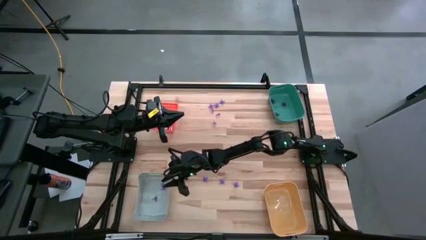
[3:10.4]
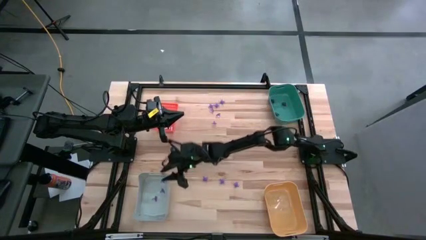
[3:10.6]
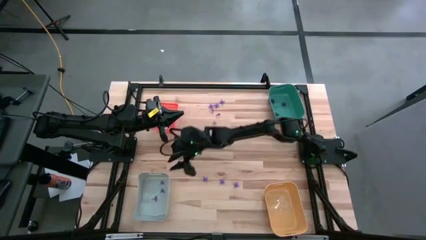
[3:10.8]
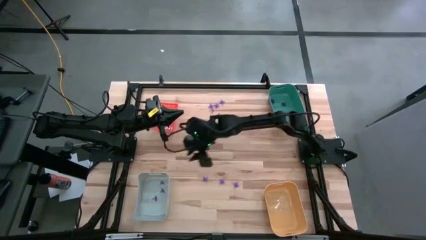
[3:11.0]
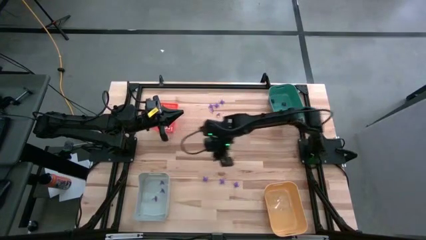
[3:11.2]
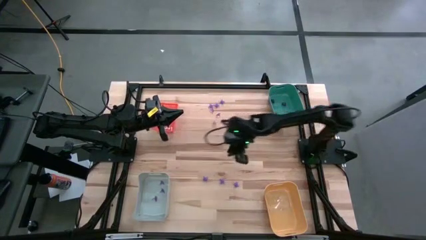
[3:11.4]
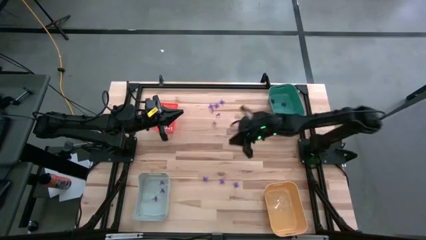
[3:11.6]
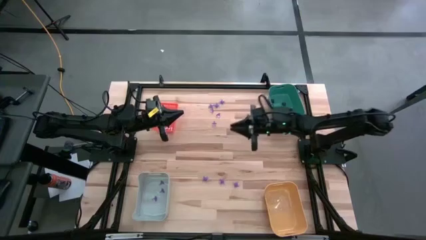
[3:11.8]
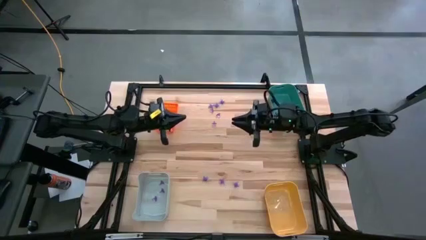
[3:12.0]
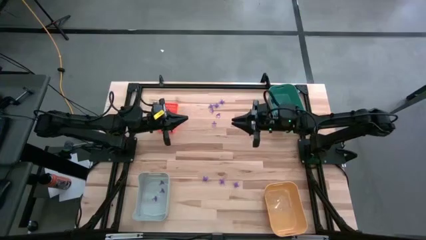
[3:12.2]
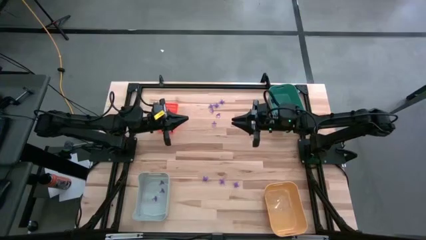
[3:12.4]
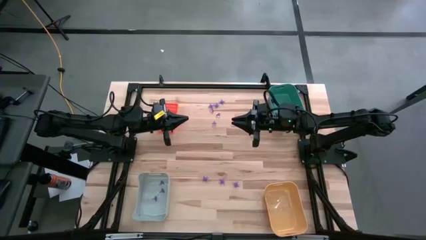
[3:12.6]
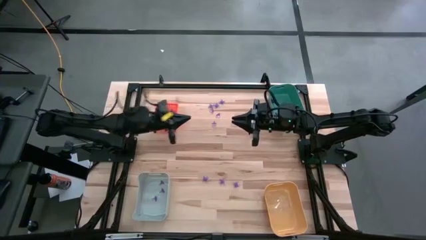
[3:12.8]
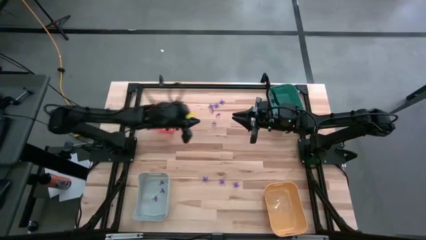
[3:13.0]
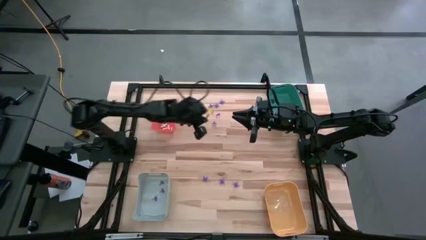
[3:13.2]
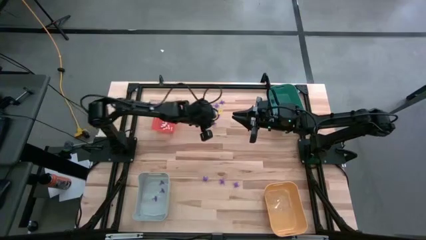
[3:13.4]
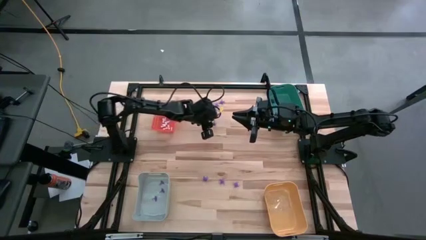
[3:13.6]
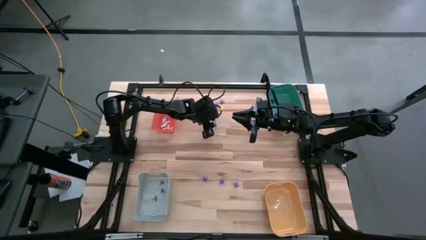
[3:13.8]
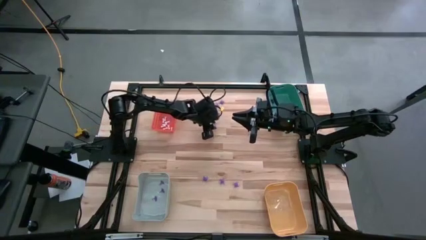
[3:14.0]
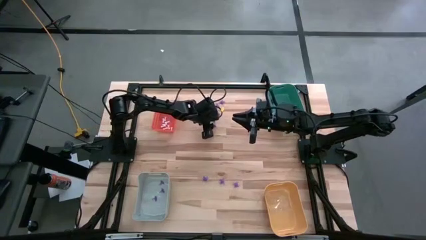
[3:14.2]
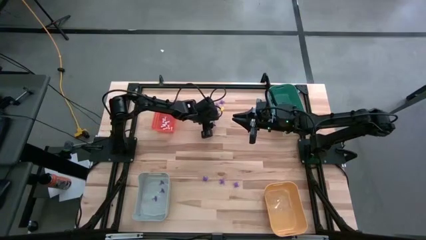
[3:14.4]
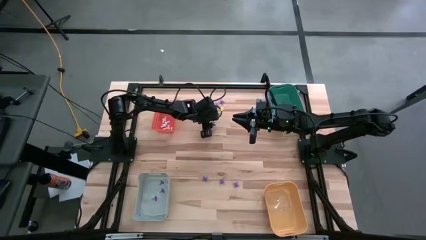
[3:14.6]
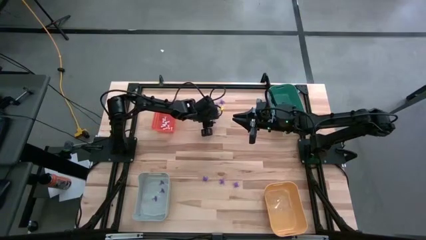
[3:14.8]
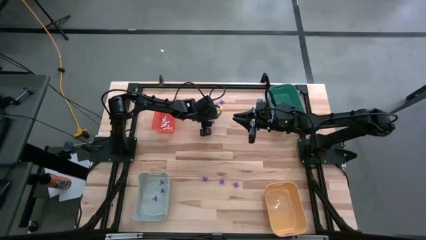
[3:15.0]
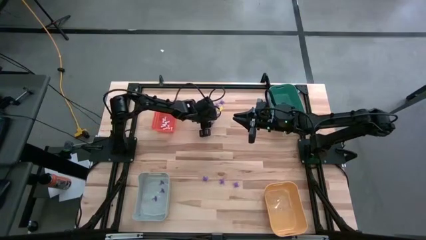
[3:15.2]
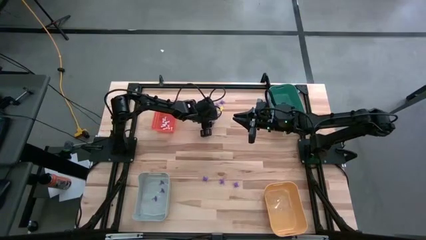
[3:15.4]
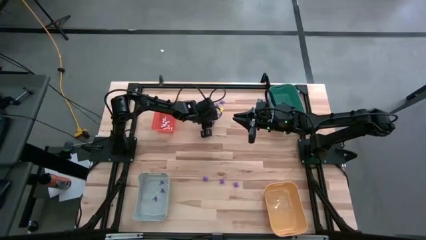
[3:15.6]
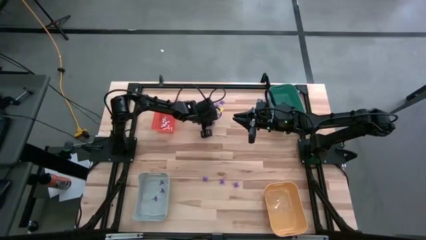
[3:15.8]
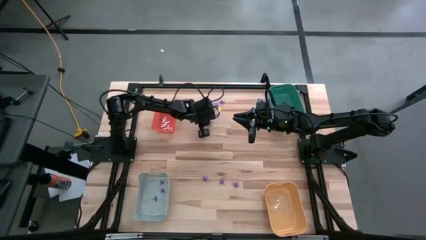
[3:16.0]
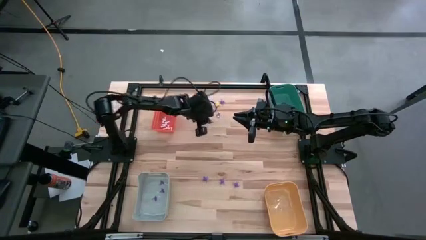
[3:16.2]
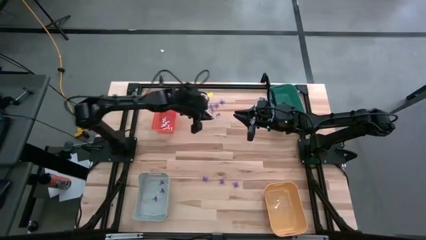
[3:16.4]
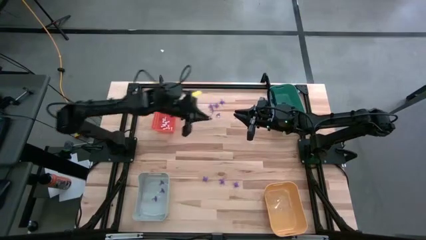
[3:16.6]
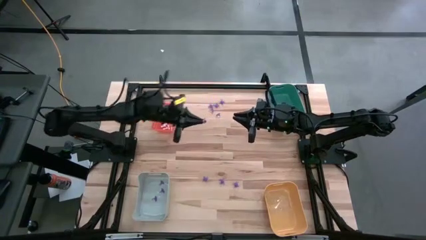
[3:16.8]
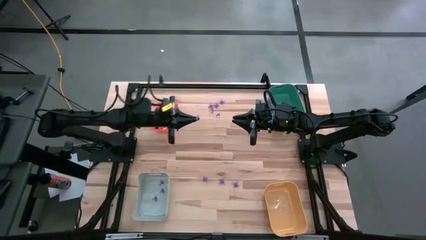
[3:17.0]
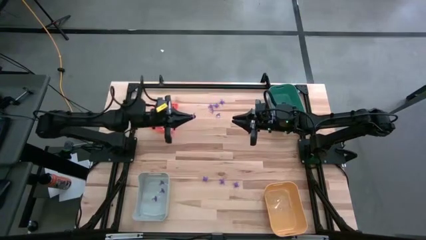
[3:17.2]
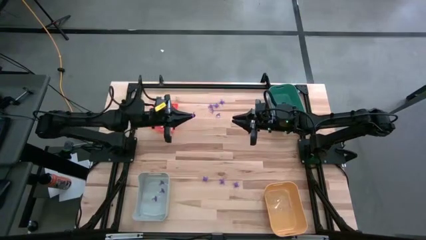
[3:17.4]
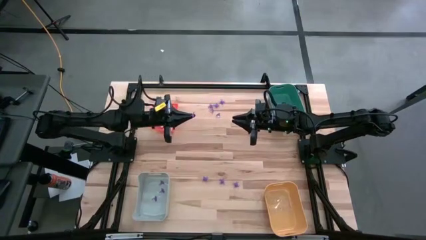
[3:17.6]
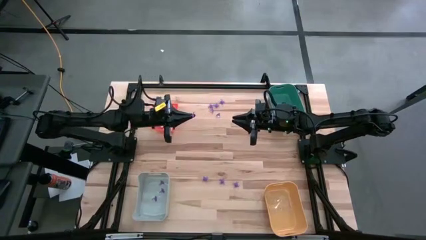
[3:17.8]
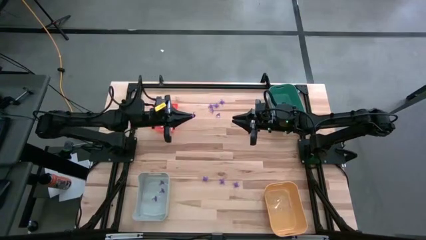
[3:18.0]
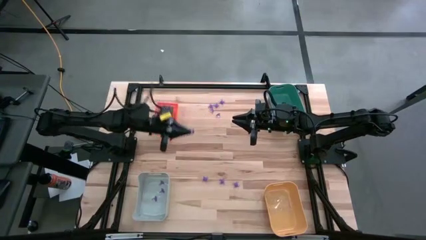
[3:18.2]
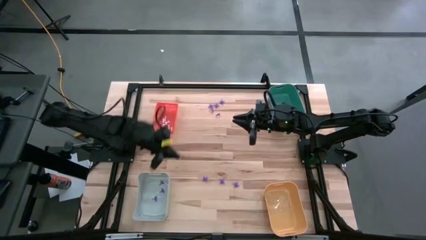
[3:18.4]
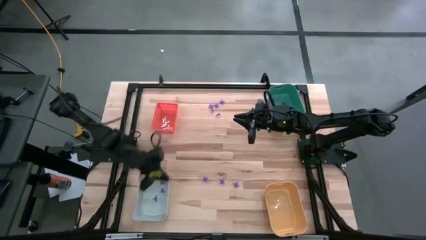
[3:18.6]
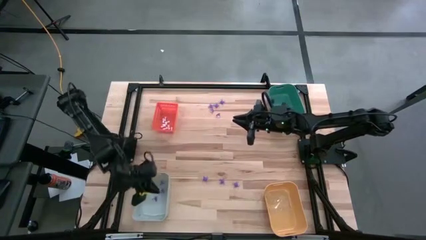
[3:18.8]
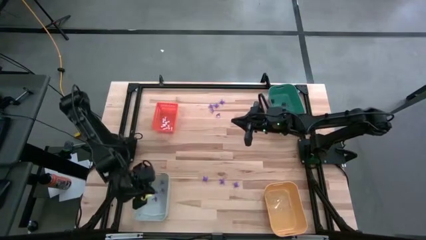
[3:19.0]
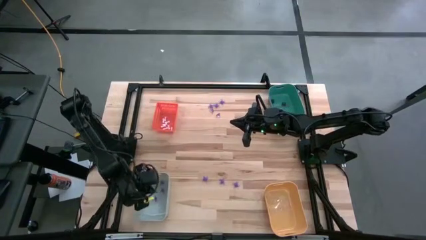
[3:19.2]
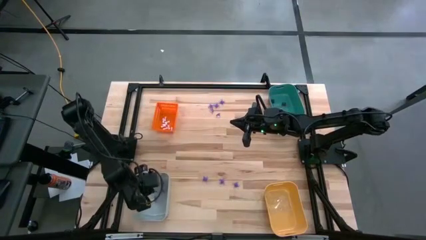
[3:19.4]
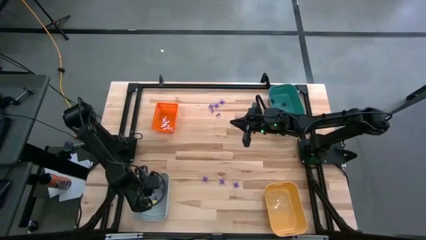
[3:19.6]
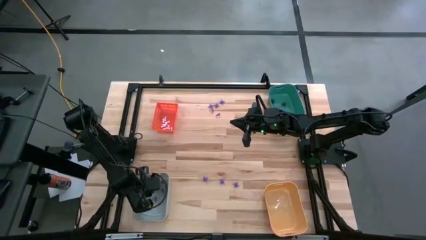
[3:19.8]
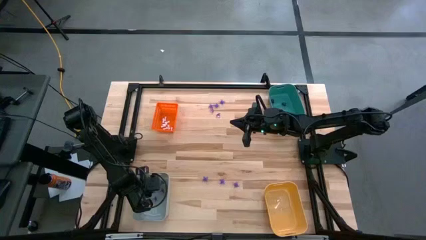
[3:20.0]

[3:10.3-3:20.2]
Task: Sort Halloween decoration
Put the violet hat toy into the gray bin

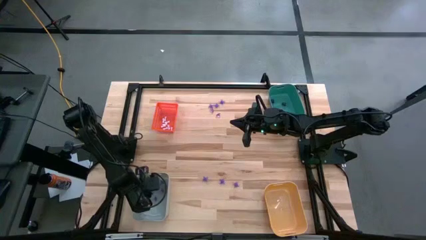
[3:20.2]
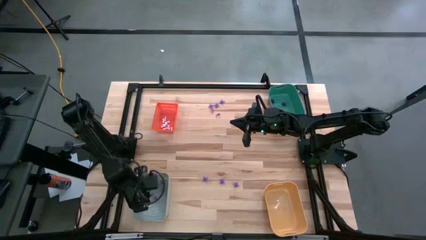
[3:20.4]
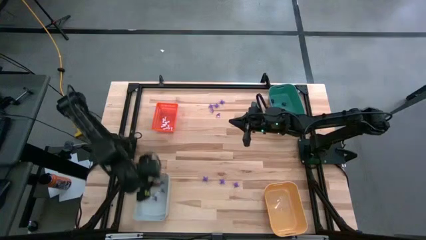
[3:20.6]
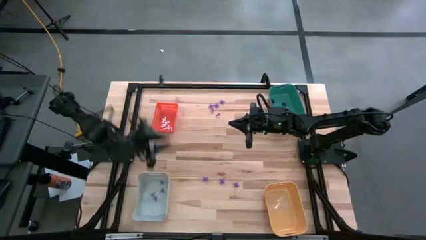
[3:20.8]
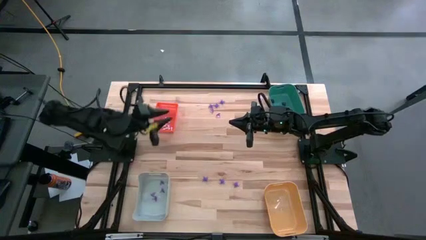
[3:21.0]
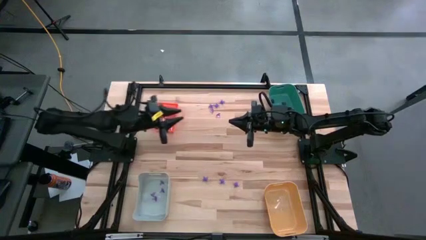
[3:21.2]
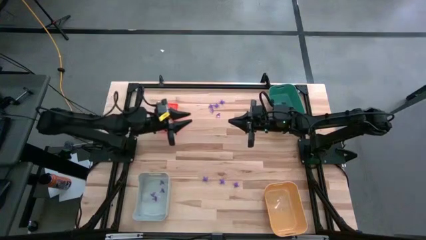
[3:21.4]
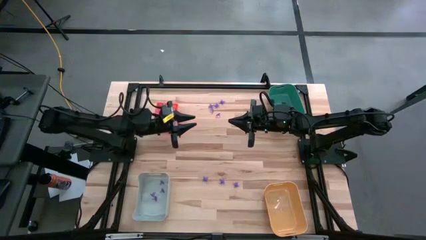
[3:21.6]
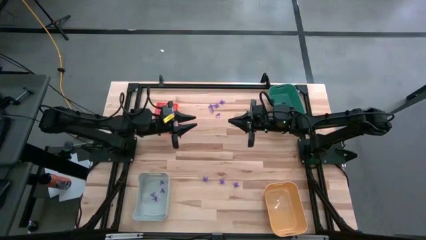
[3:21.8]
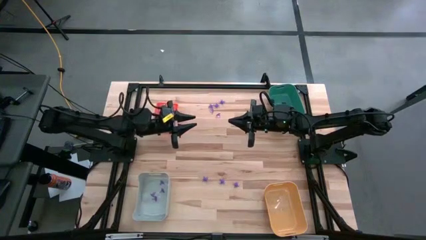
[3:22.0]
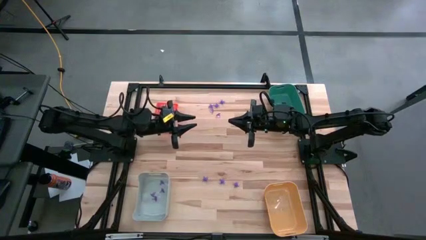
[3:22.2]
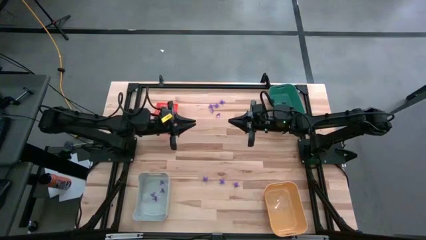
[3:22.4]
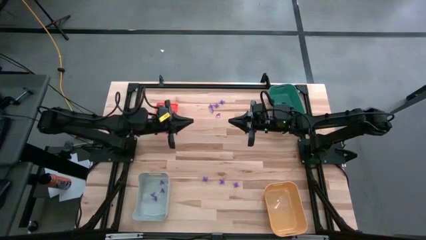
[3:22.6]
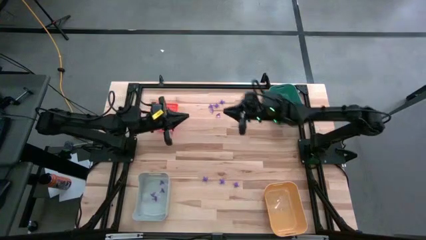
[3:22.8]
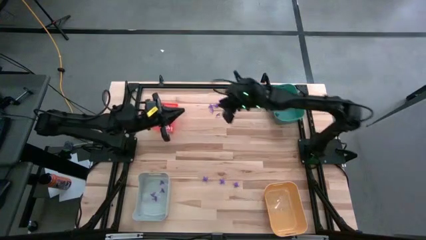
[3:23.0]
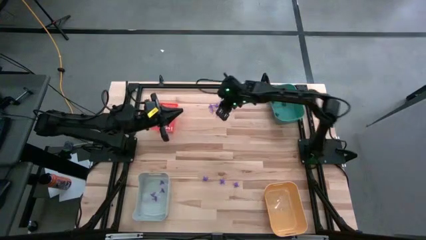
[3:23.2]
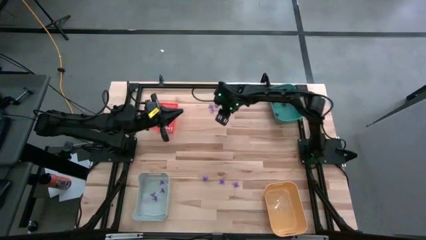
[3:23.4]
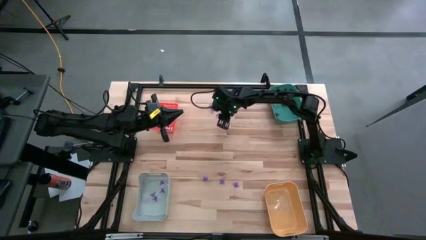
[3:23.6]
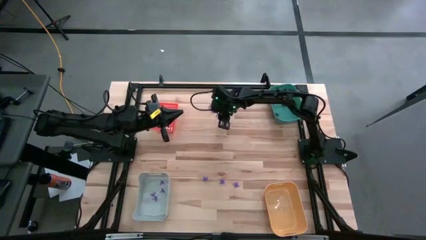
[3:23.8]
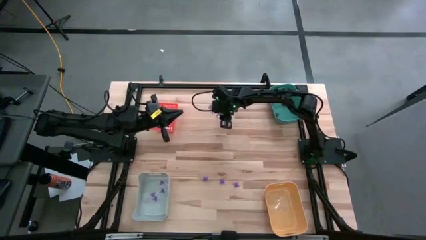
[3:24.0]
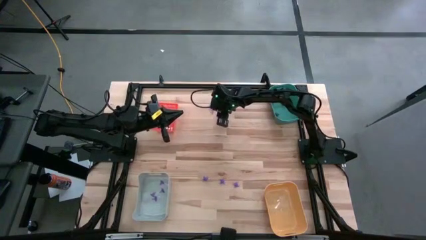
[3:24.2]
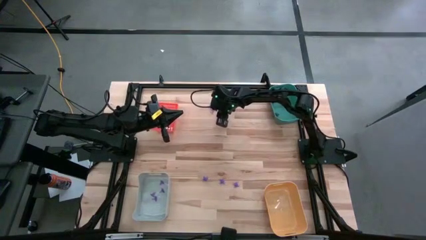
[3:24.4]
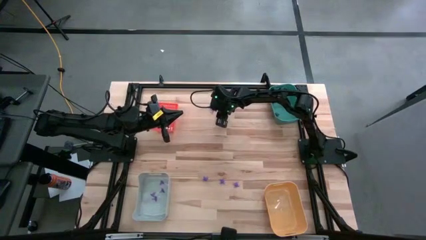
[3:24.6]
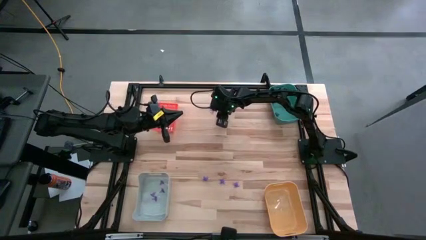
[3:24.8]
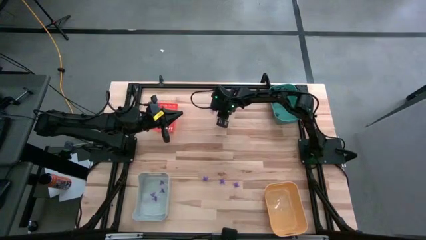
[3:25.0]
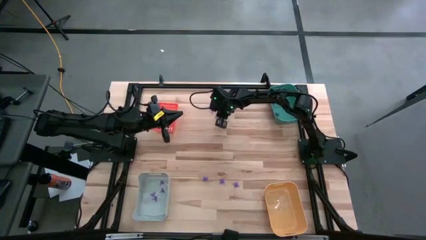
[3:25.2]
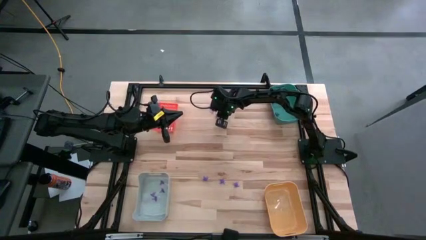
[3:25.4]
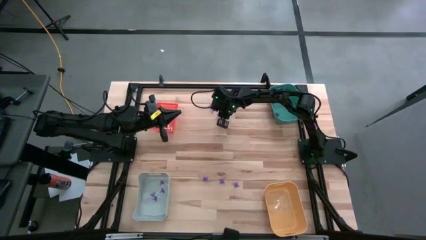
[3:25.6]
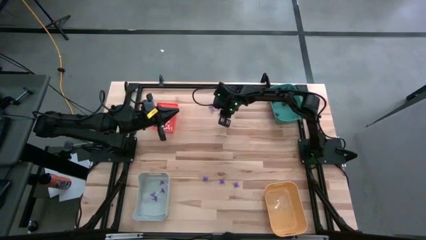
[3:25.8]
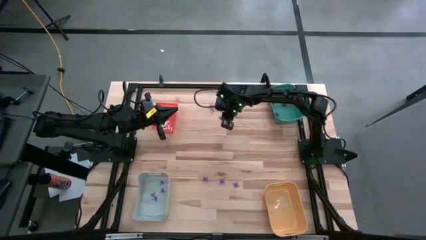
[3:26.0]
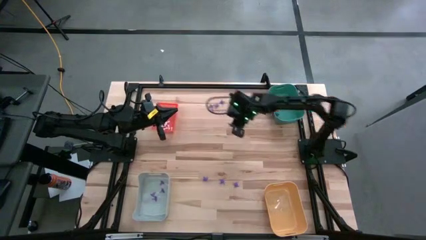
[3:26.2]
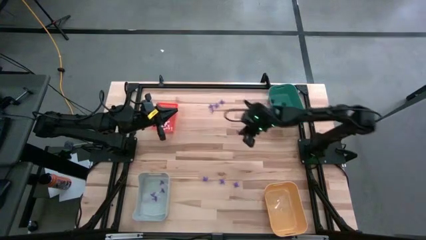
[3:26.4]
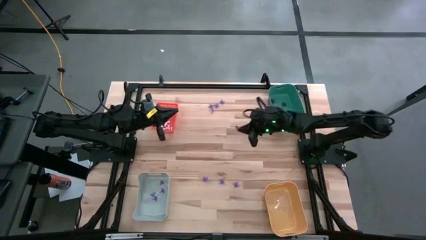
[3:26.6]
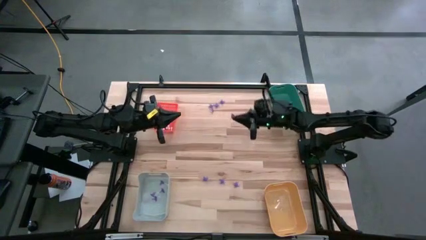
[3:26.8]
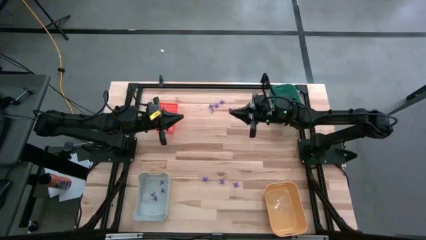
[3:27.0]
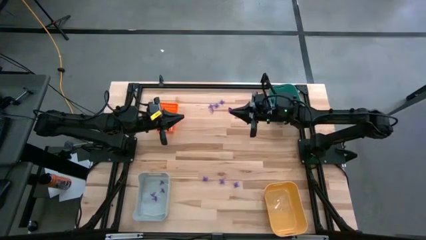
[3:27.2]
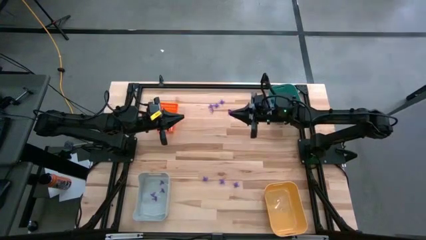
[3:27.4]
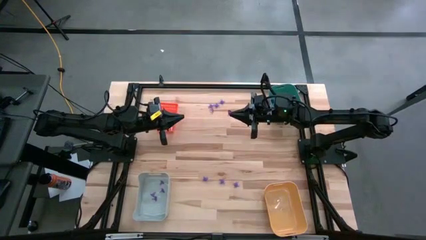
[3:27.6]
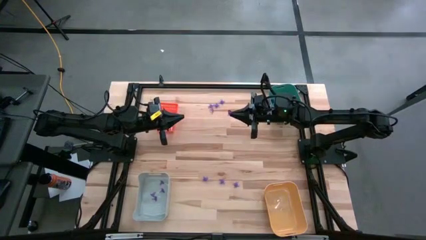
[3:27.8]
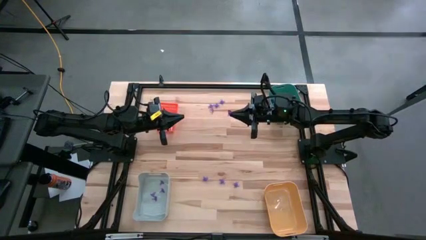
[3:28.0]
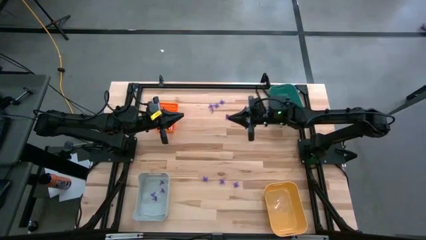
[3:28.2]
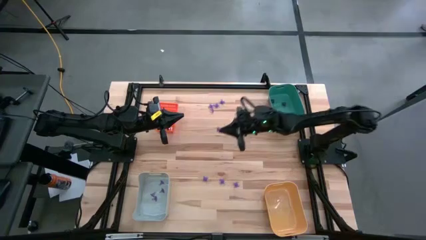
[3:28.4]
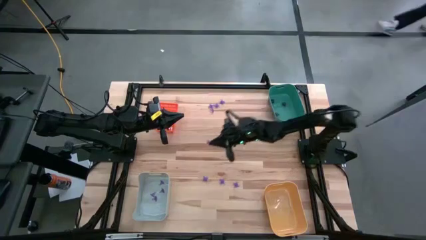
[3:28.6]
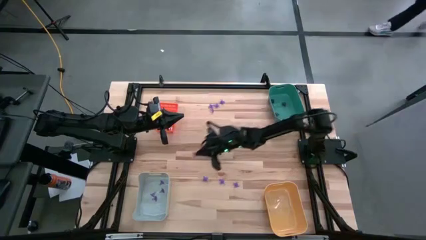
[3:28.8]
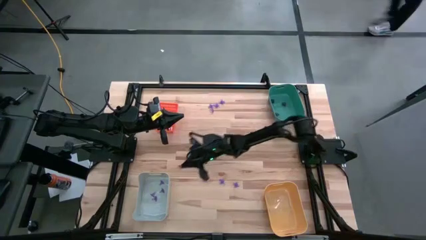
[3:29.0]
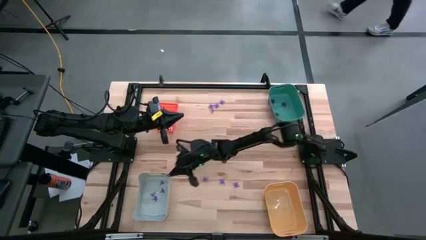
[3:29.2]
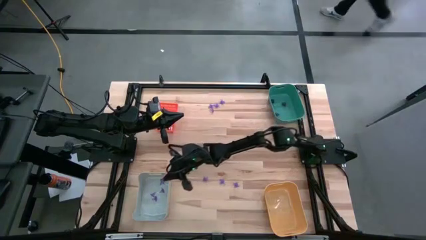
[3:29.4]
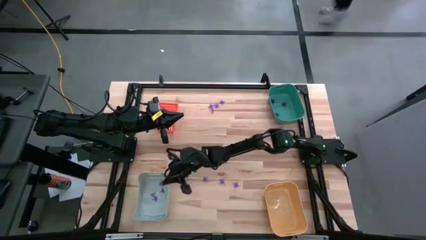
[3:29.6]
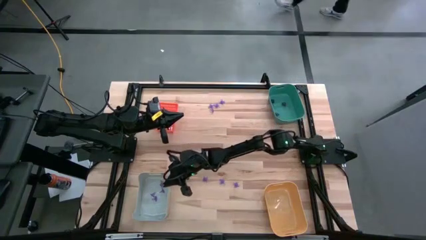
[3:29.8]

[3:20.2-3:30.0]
Put the violet hat toy into the gray bin
